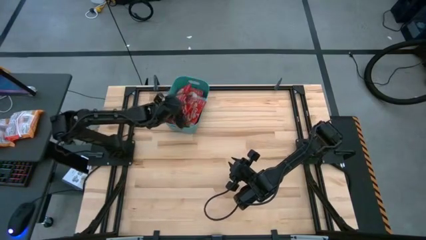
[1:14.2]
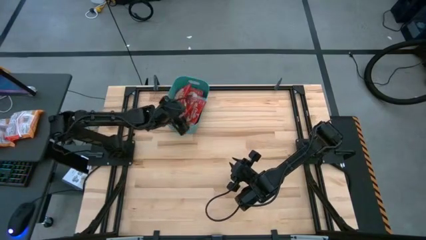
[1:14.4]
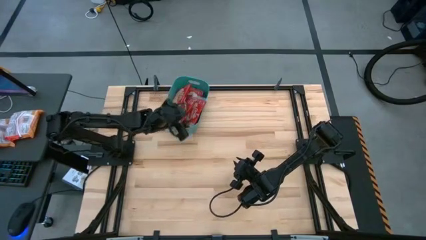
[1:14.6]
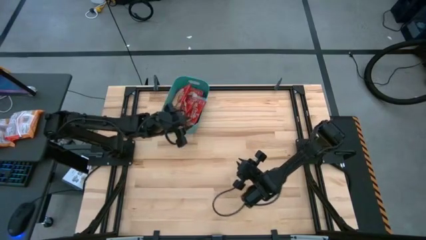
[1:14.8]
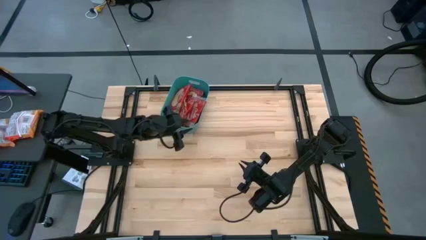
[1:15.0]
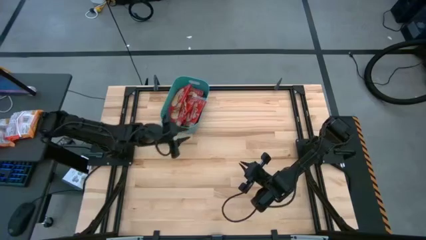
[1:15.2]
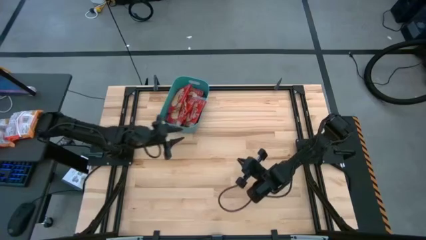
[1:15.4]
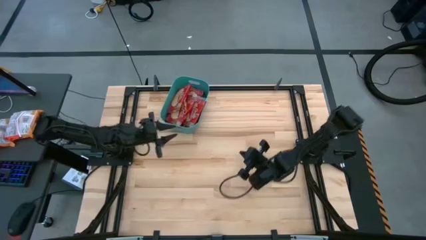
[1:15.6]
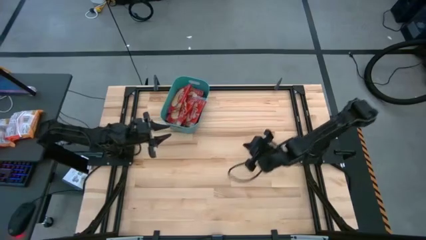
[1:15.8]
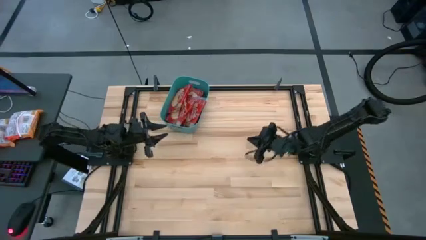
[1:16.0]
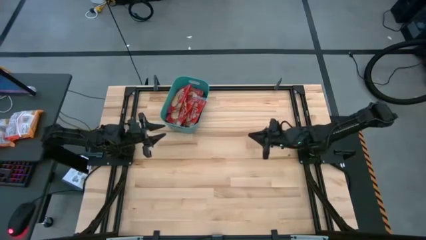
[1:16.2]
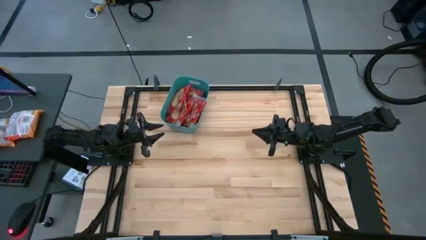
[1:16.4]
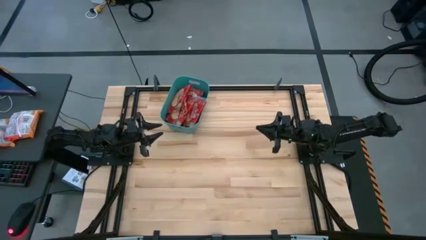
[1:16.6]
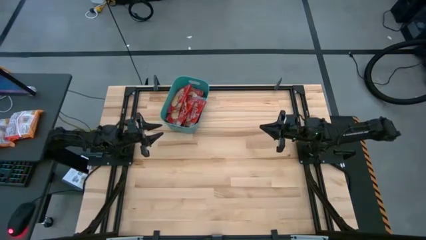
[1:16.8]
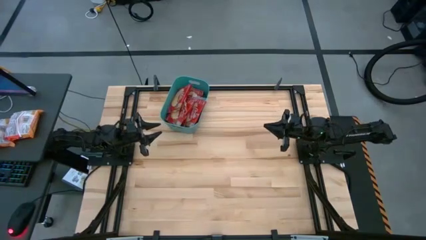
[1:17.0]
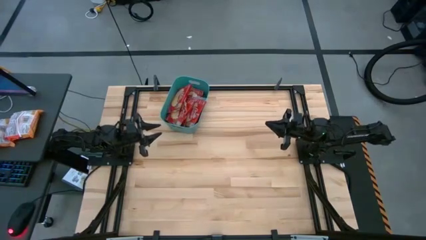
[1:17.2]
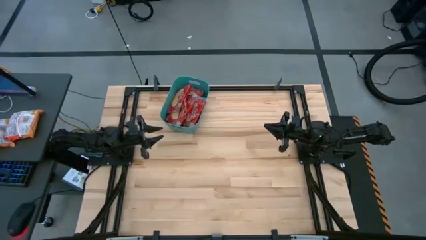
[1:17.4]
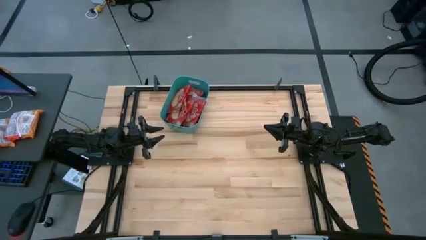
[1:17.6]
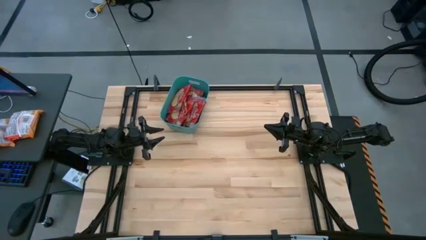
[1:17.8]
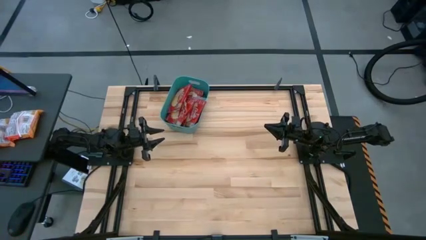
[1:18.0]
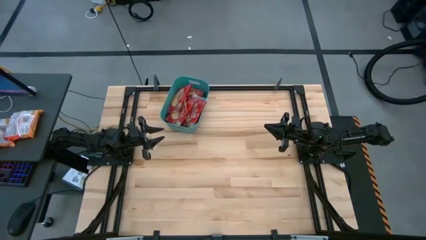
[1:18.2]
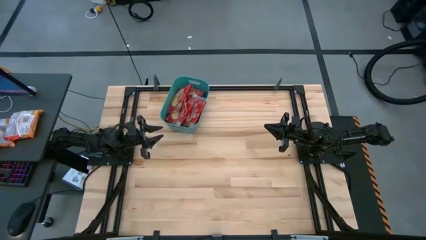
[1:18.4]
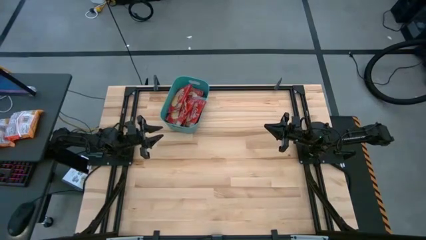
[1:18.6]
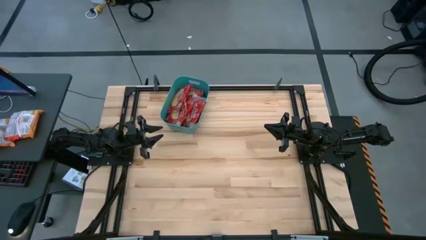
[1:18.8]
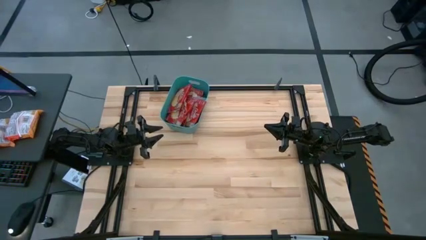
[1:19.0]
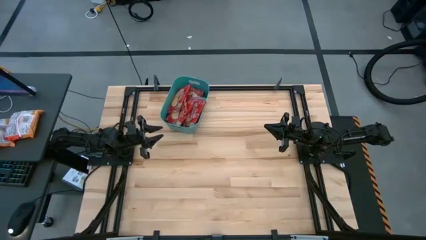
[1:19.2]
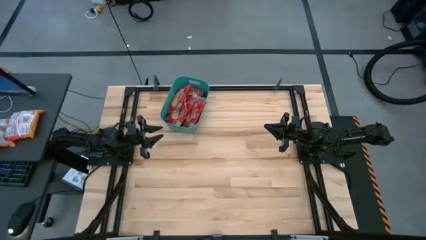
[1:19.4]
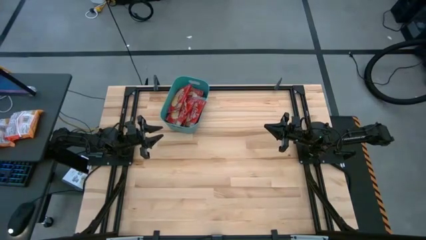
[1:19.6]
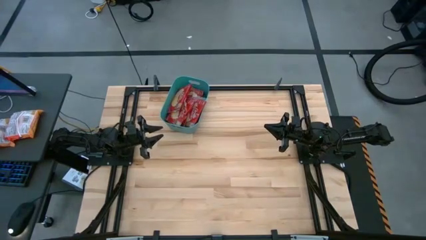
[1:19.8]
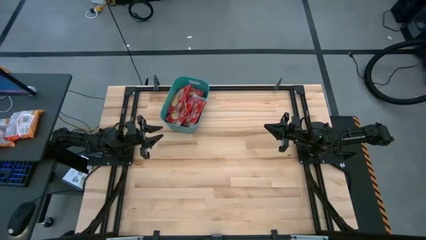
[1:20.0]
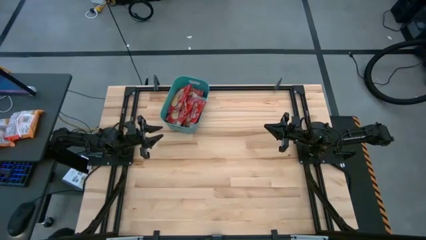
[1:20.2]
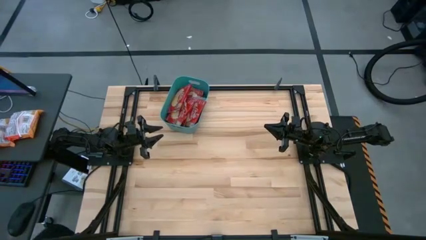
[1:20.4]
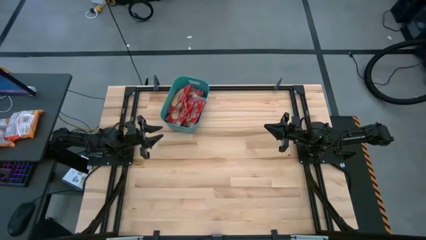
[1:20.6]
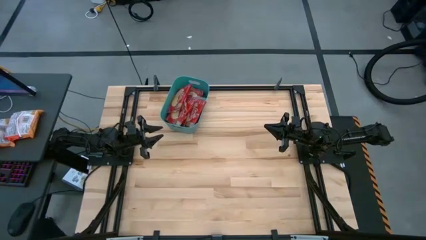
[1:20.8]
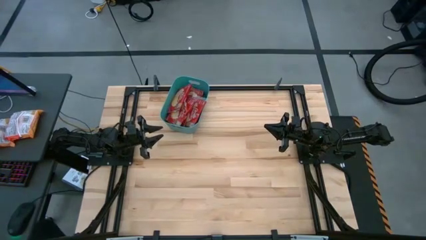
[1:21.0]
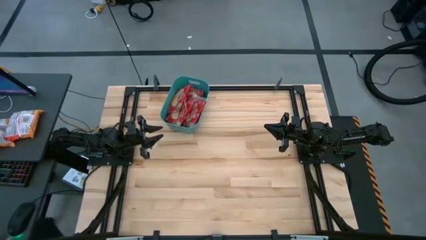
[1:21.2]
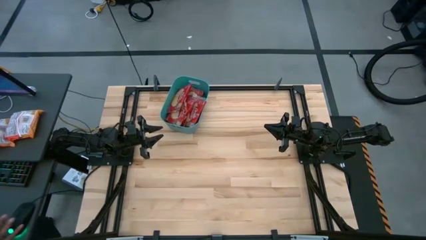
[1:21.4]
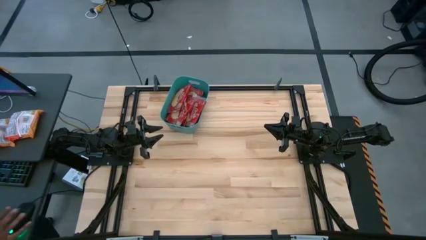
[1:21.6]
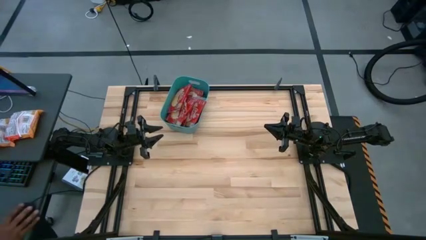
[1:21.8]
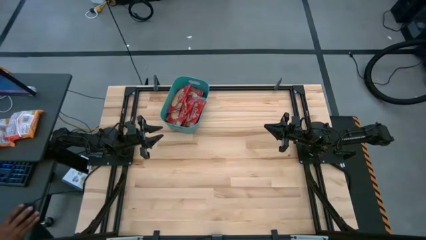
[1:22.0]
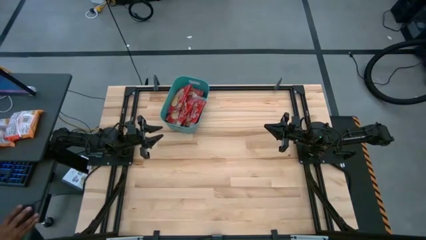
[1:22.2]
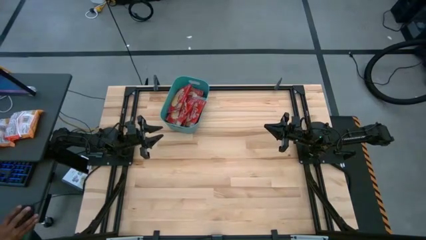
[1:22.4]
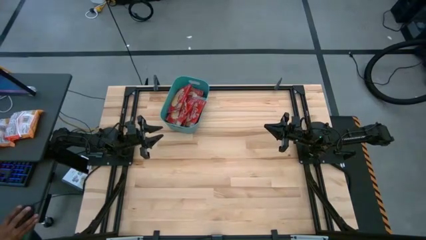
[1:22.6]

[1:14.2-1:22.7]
Task: Sort popcorn bags into baskets
Return to Home Position

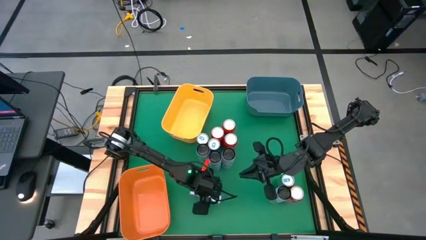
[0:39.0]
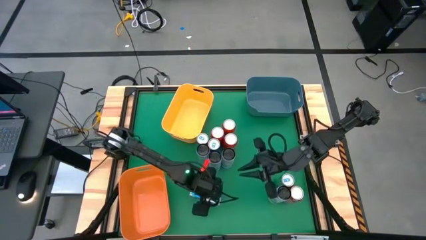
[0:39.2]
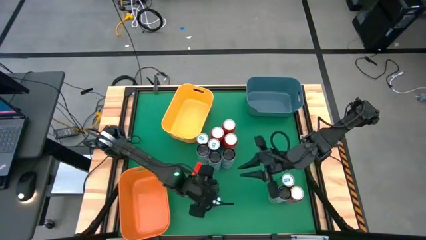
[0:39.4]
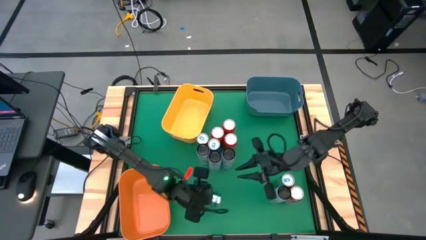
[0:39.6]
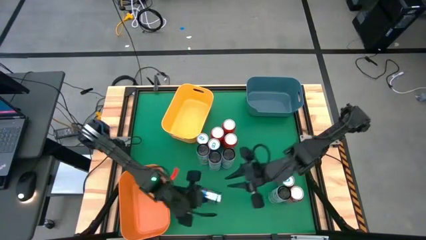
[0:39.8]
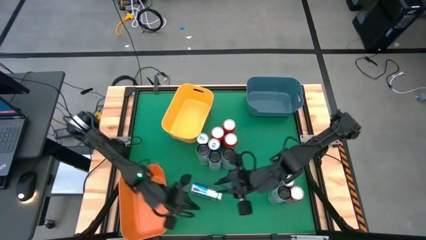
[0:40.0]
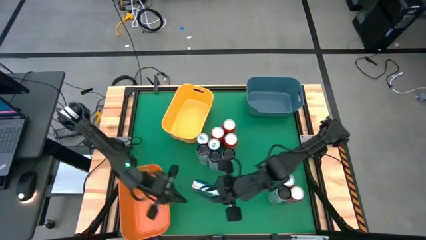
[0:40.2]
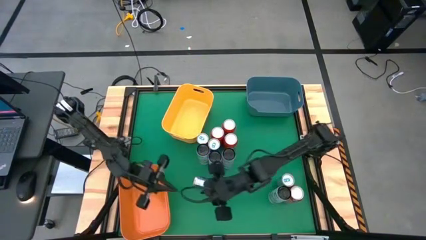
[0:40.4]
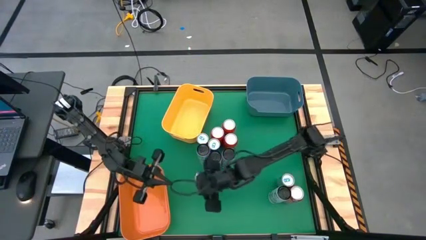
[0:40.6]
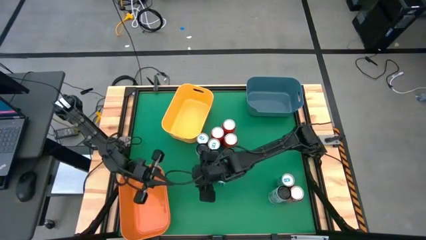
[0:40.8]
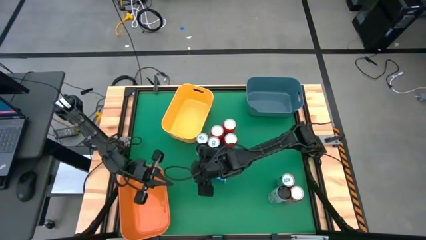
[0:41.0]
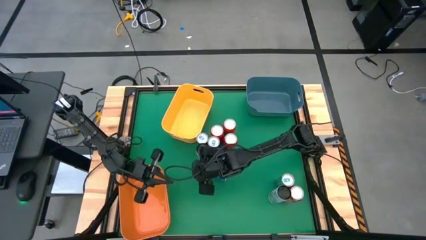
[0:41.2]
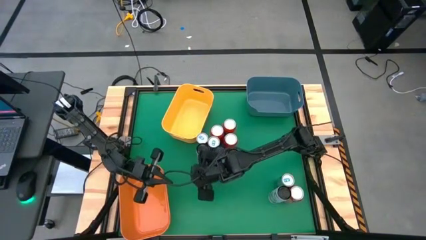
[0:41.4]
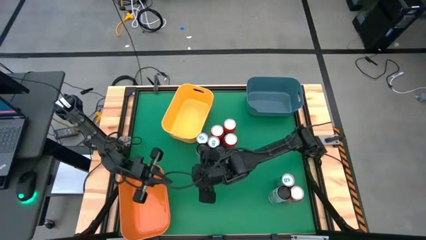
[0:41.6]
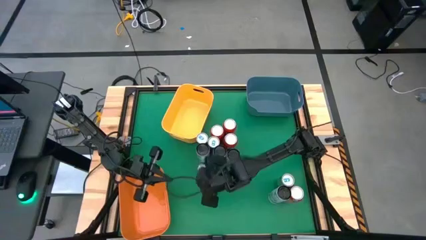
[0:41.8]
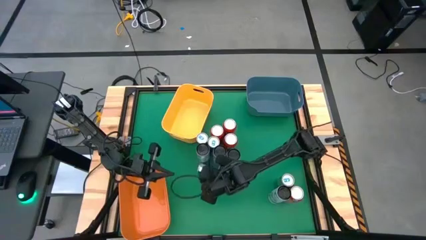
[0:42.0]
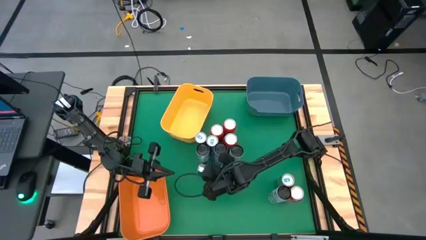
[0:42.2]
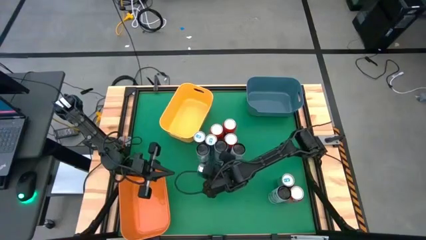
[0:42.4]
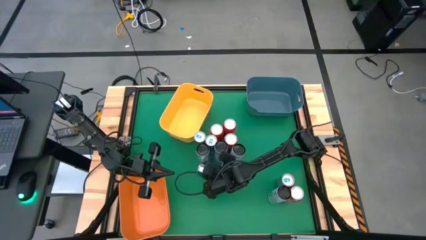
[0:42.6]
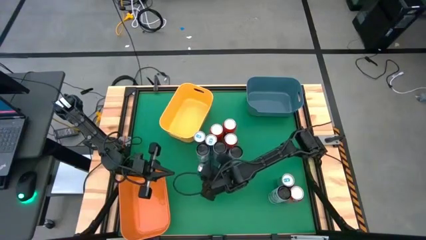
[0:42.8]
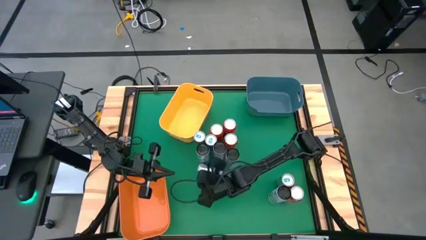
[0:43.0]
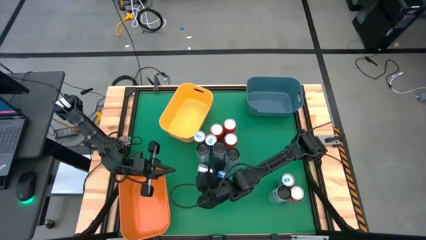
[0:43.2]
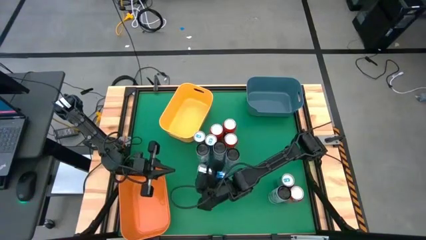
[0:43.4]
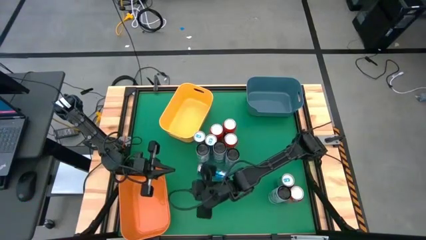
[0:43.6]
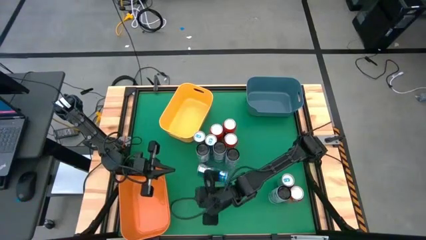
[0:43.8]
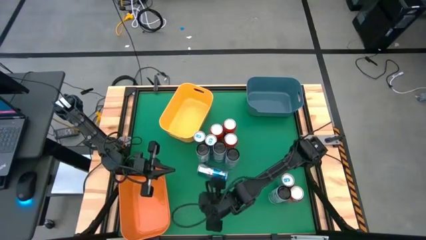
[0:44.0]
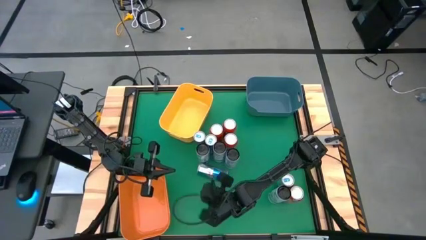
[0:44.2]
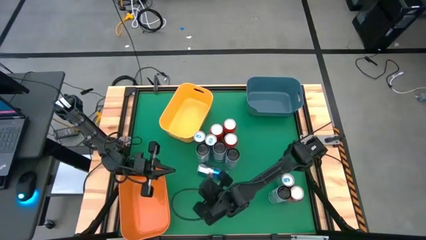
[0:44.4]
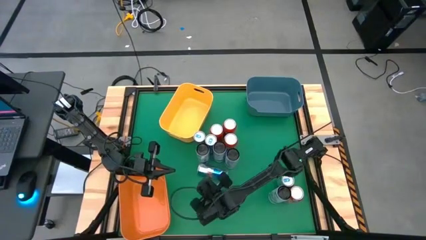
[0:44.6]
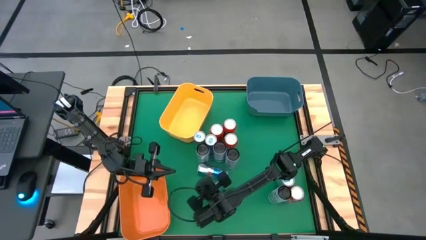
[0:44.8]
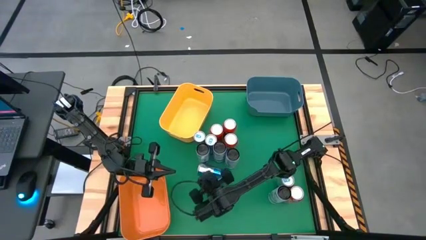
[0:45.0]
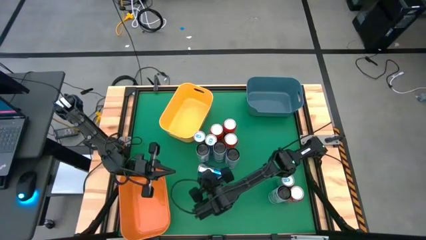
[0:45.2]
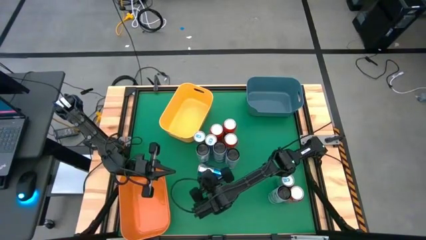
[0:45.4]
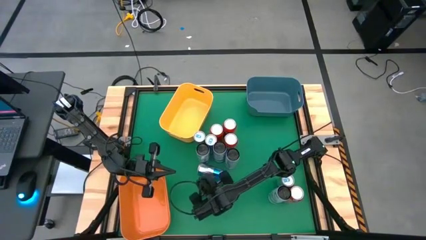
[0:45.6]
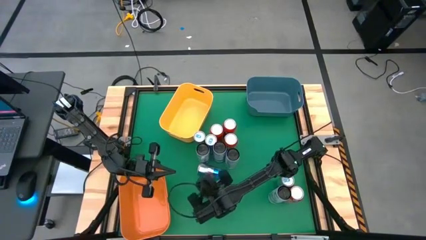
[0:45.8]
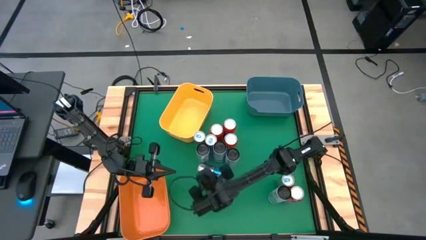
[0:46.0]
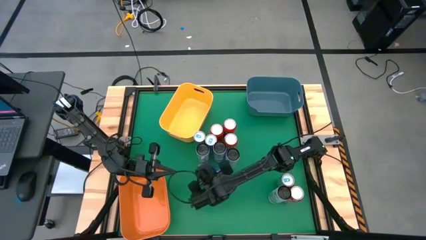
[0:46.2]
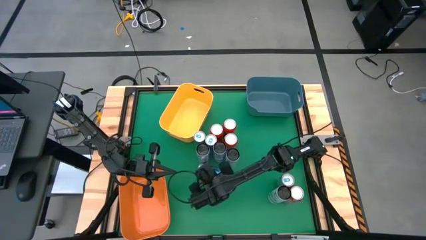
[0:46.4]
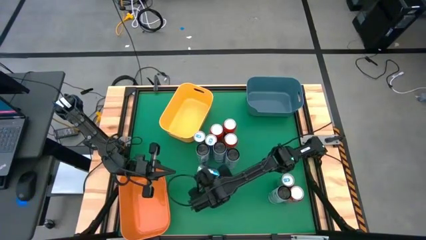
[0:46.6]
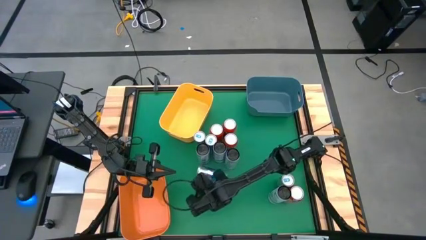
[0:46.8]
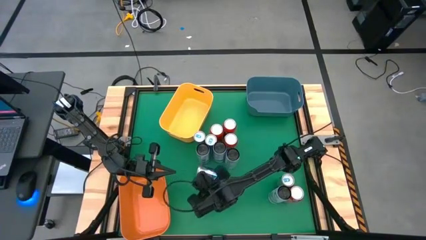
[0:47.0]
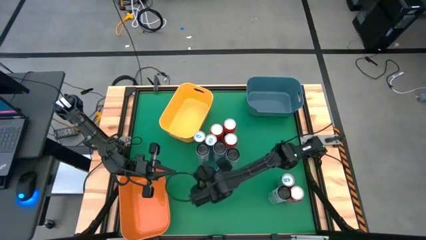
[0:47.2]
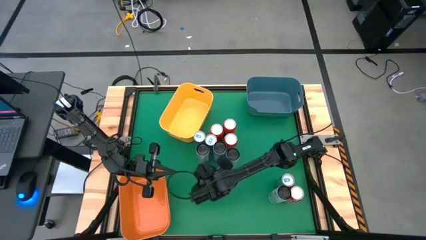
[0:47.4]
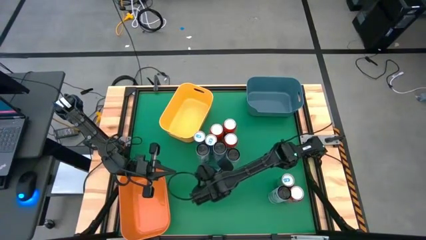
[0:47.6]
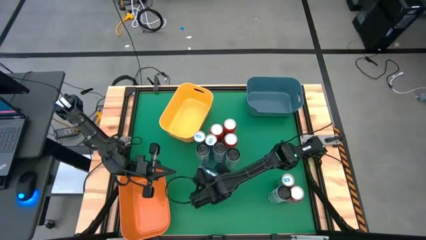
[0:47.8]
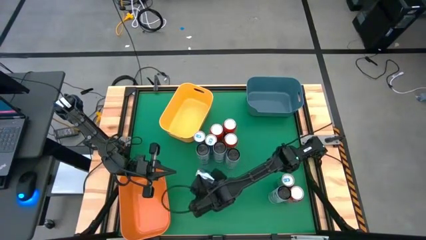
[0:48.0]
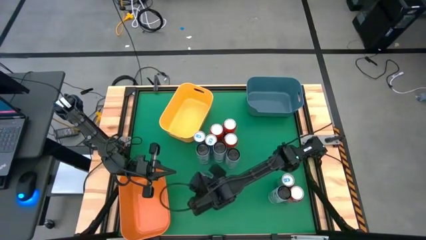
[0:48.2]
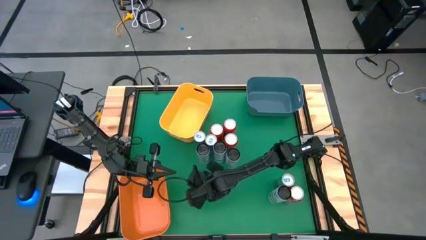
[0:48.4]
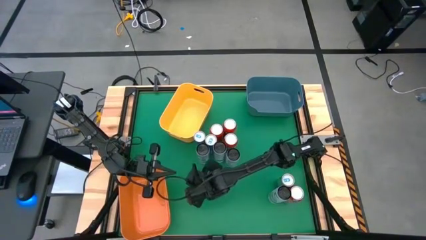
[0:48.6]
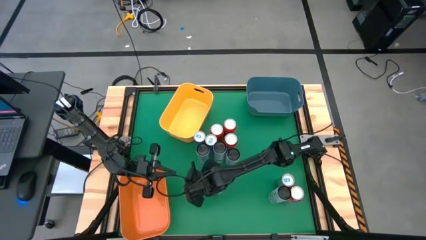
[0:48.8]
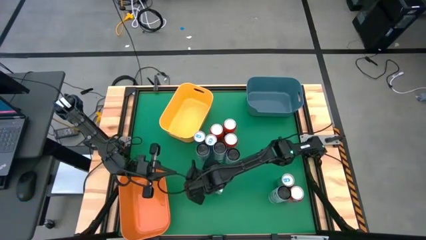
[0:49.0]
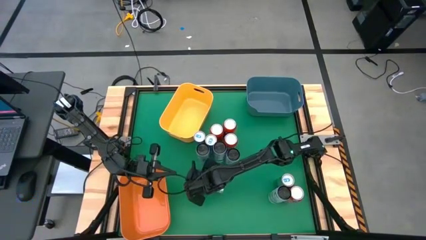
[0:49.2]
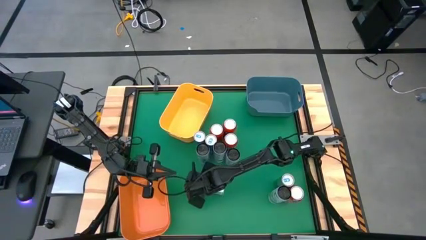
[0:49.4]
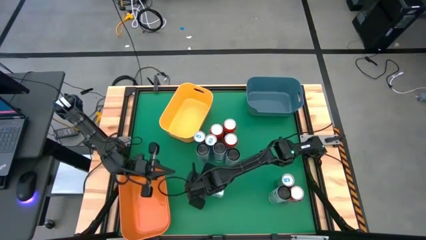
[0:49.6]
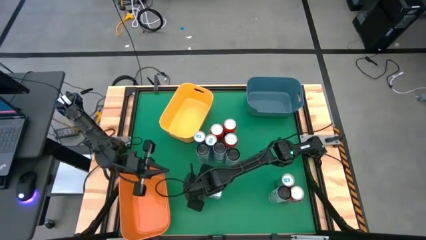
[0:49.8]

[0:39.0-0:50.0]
Task: Sort soda cans
Put the blue soda can into the yellow bin
